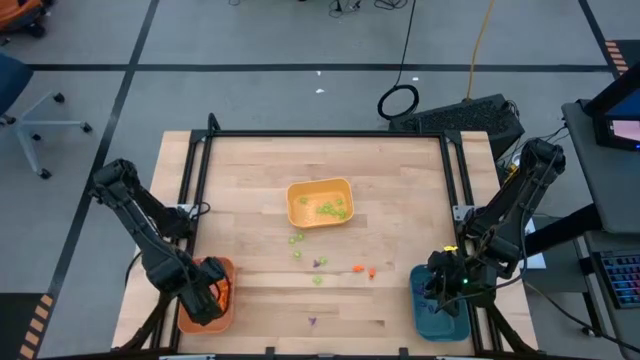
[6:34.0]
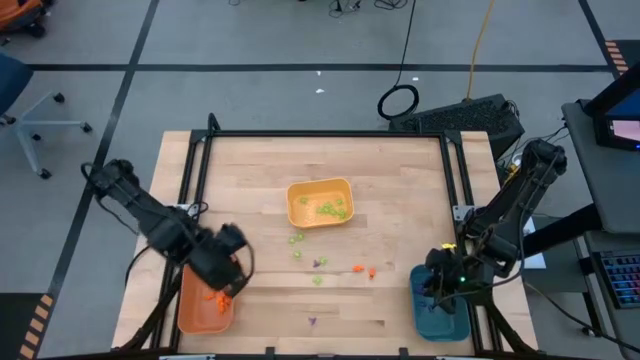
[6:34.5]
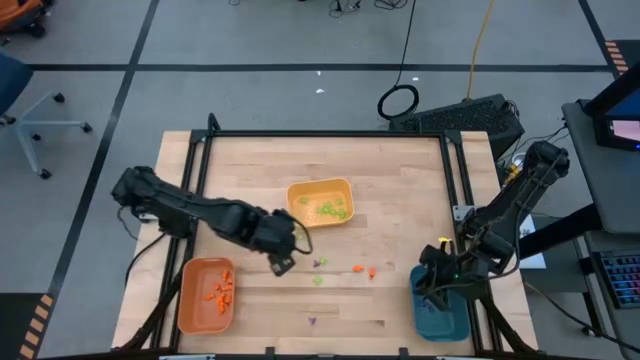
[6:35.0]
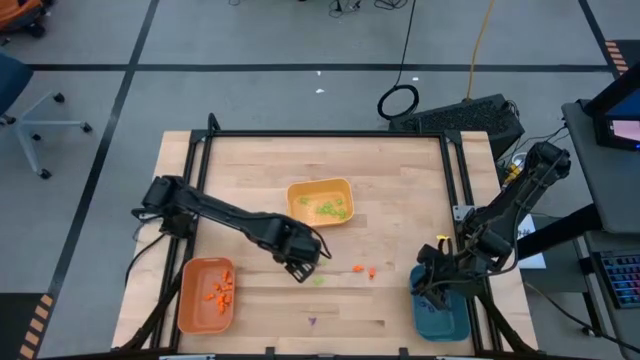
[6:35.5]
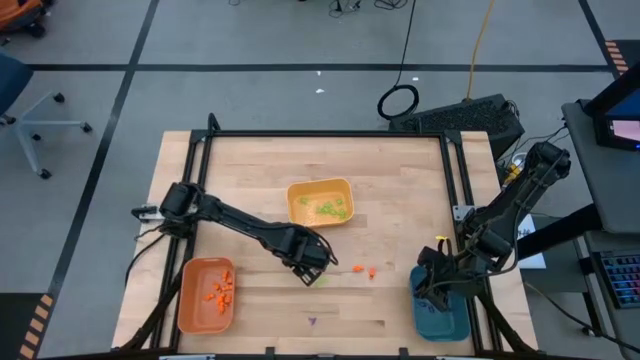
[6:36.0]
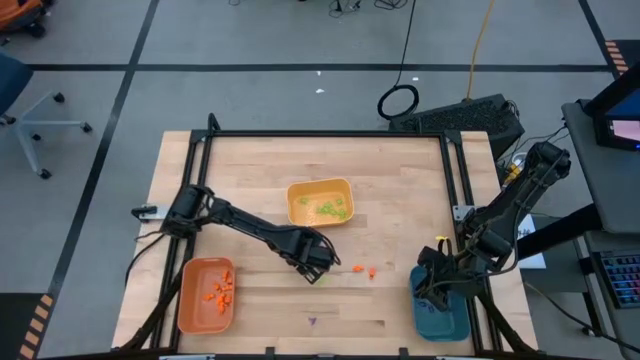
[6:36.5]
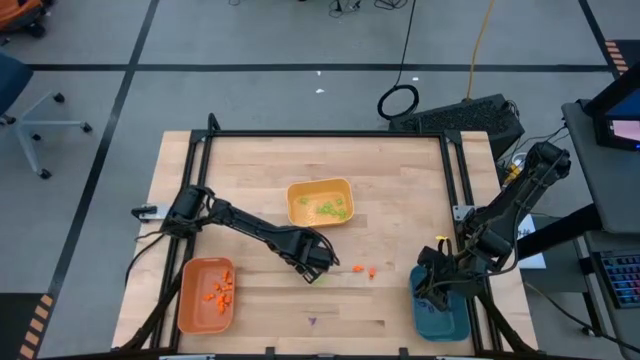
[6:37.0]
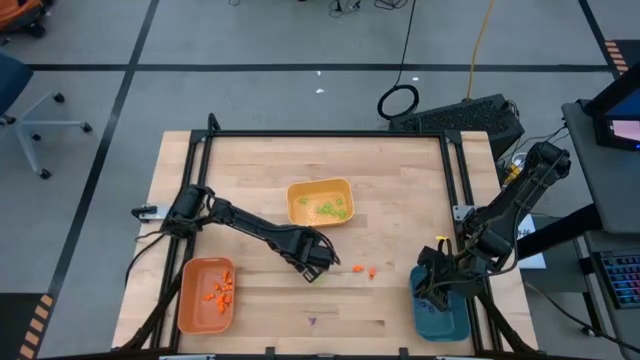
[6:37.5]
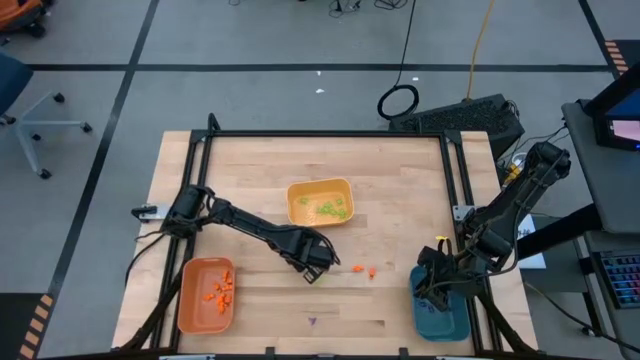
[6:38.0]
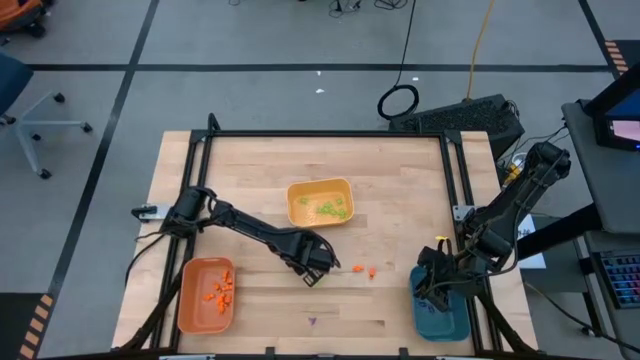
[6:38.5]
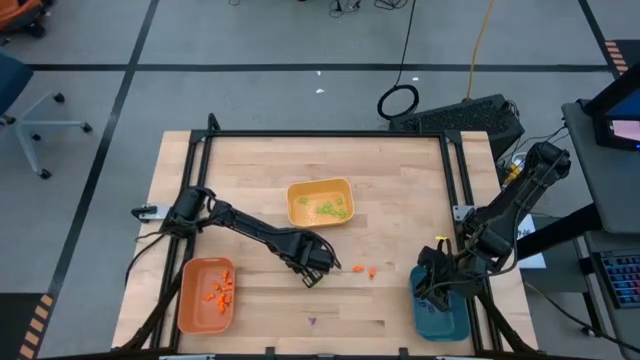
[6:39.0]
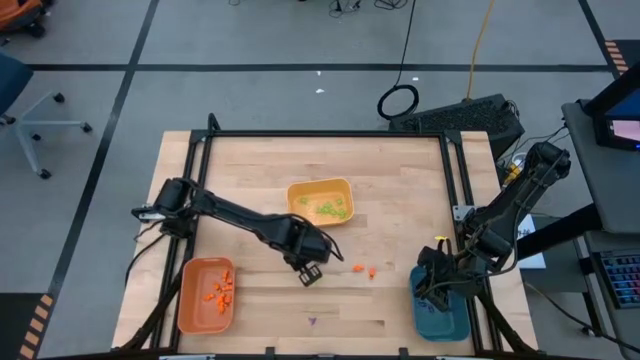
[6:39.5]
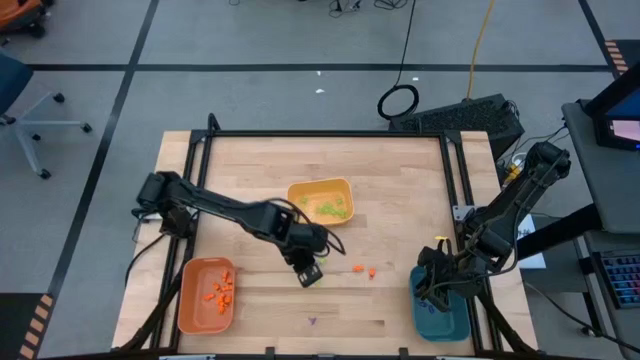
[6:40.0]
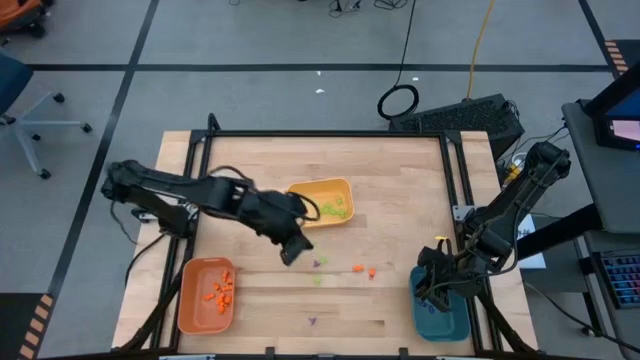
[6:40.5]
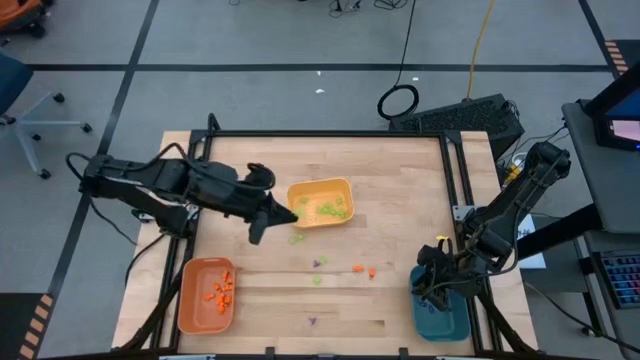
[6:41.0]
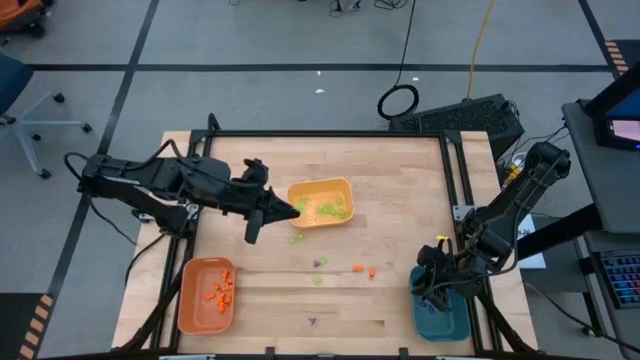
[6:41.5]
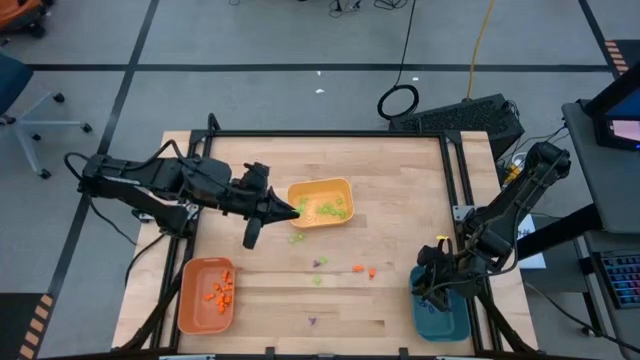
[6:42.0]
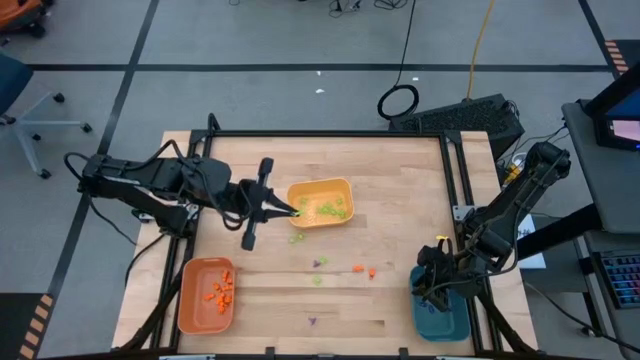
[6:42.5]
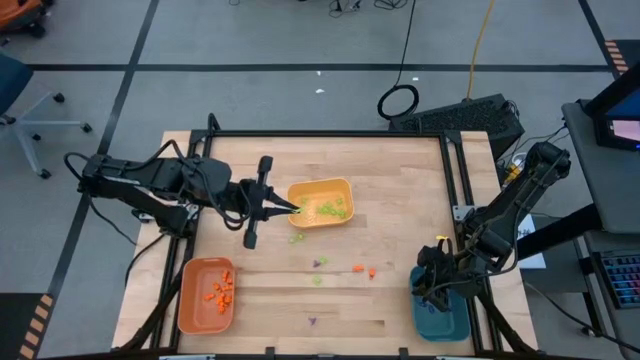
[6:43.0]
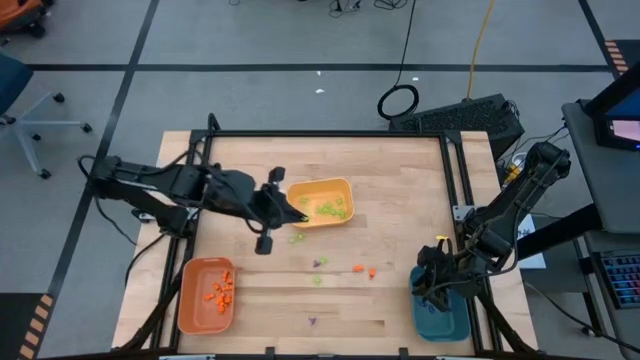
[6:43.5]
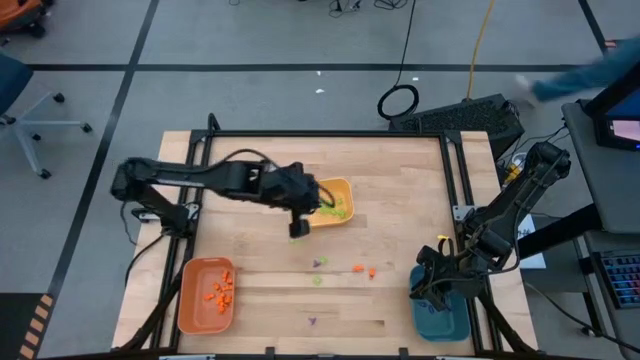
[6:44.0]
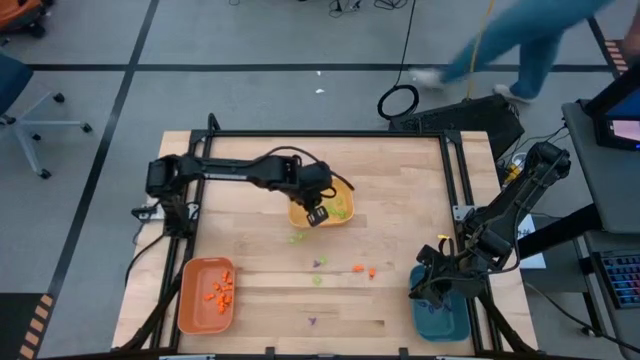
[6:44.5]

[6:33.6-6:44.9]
Task: Sort Halloween decoration
Put the green spider toy into the yellow bin

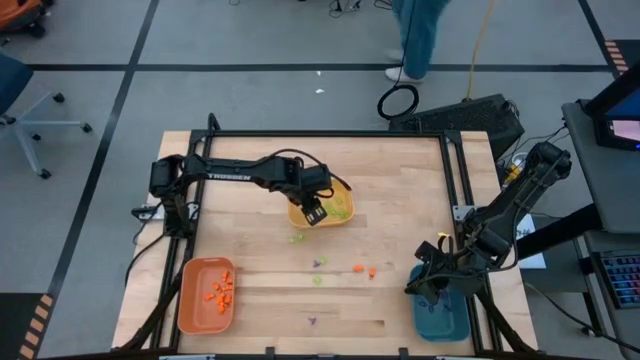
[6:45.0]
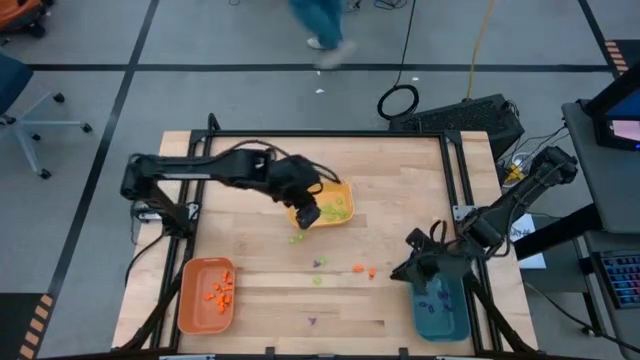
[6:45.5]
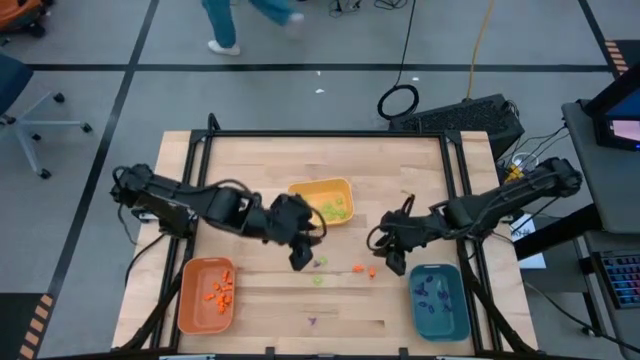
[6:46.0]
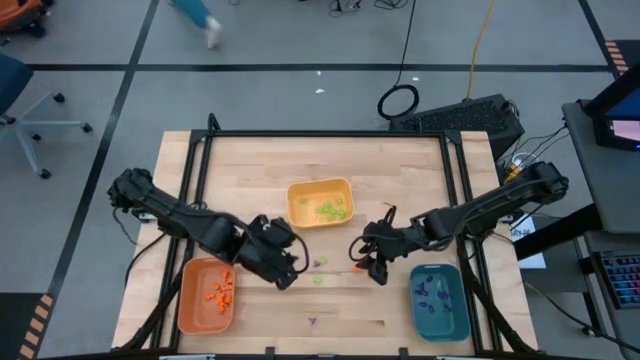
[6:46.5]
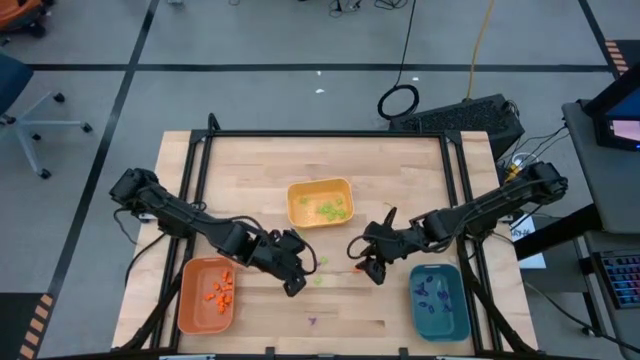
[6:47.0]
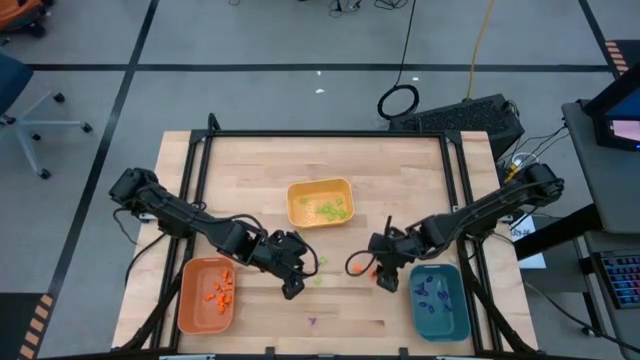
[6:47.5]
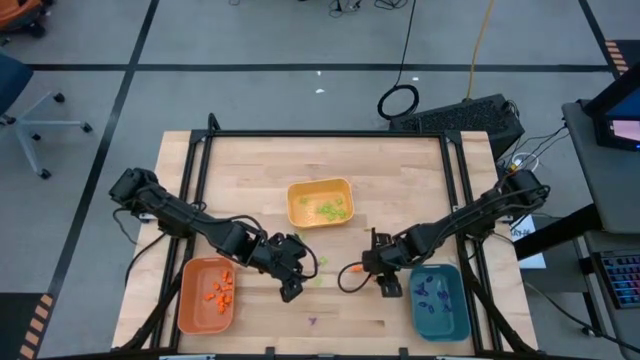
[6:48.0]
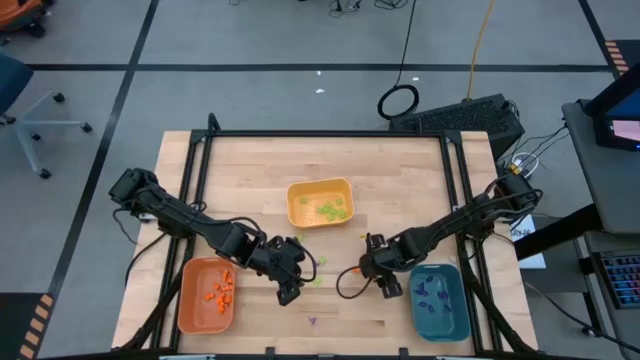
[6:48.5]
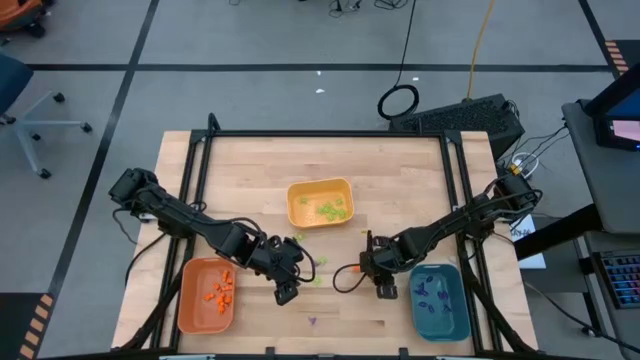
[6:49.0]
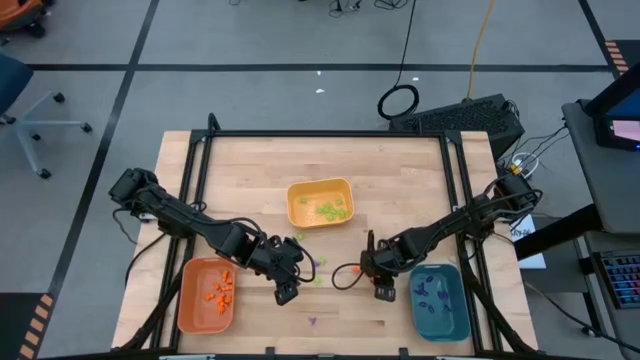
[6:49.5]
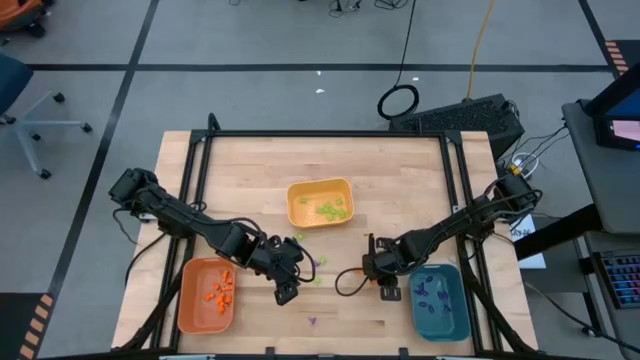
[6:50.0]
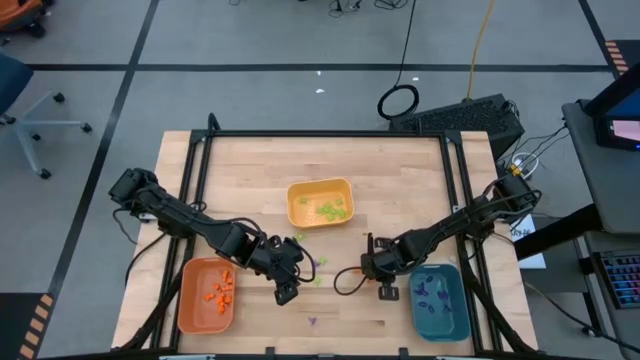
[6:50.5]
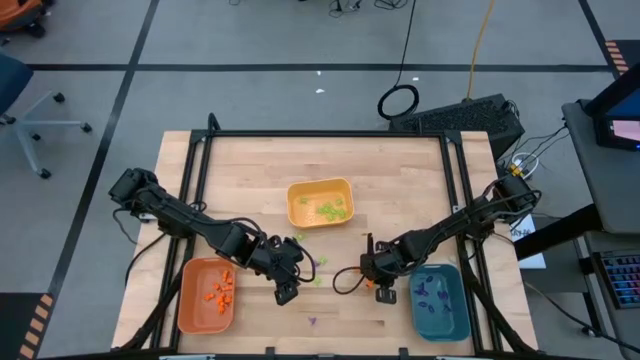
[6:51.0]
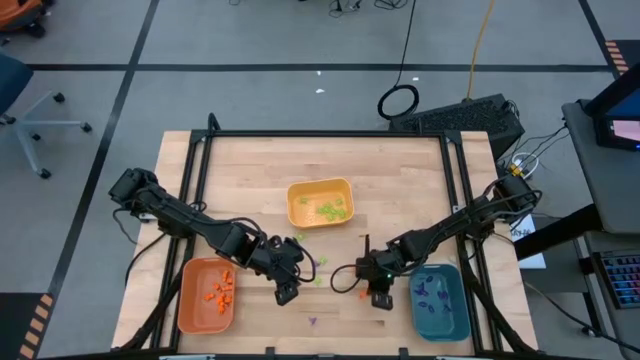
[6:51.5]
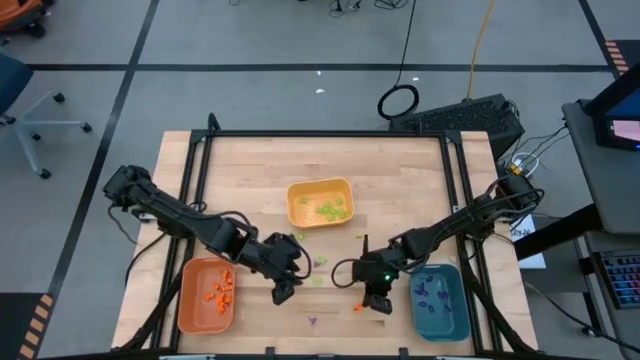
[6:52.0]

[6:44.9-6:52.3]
Put the orange skeleton toy into the orange bin

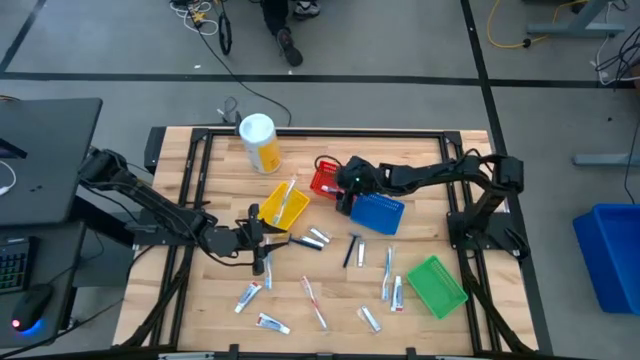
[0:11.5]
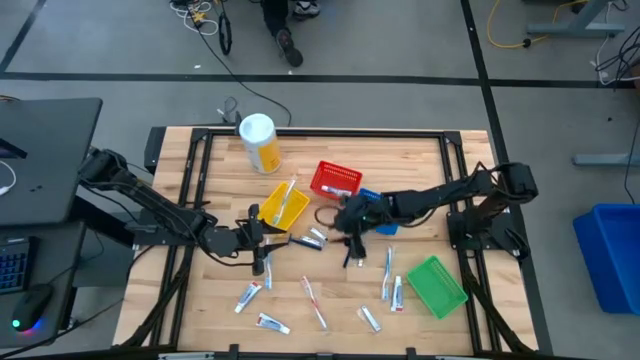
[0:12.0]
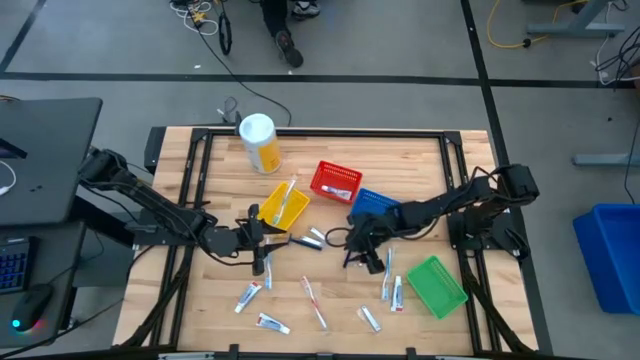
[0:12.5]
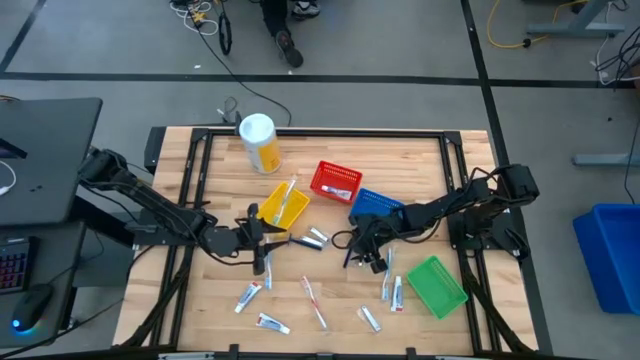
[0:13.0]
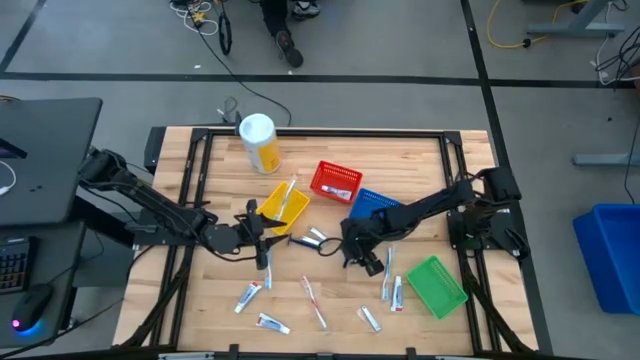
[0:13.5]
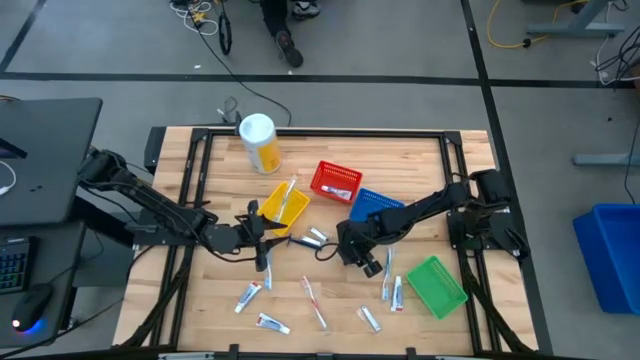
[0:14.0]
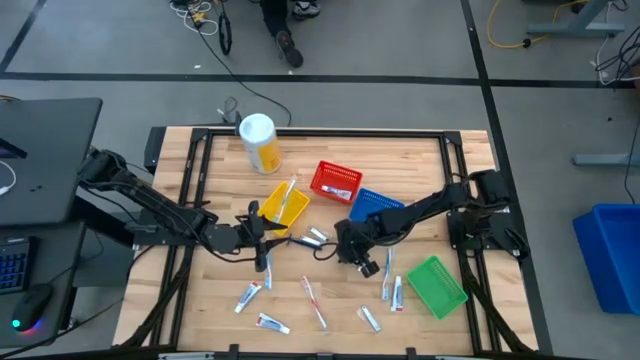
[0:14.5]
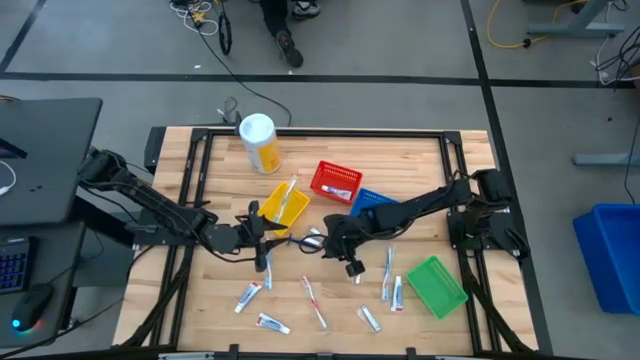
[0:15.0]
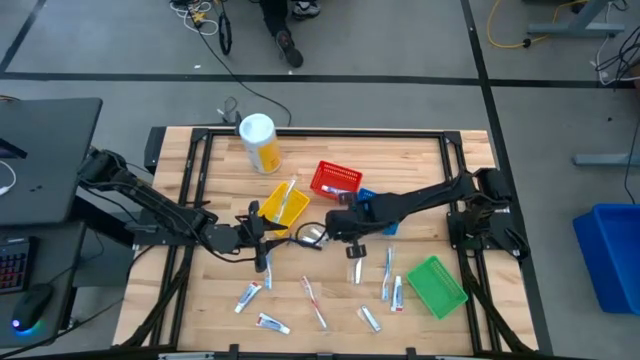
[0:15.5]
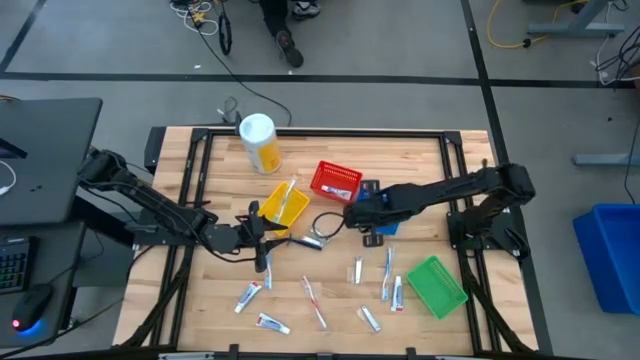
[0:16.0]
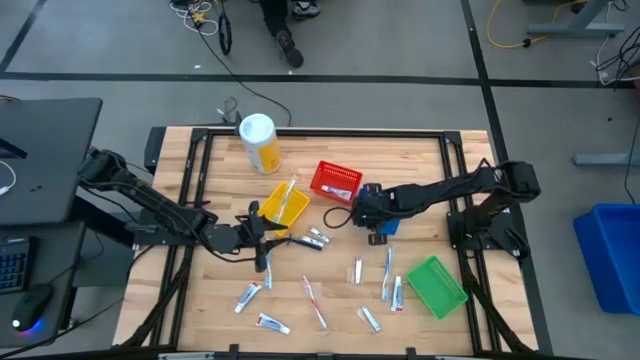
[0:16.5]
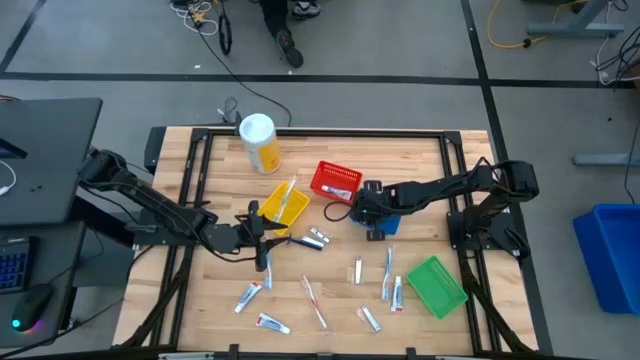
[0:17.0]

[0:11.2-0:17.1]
Task: Pick & Place Travel size toiletries
Put the blue razor into the blue bin
